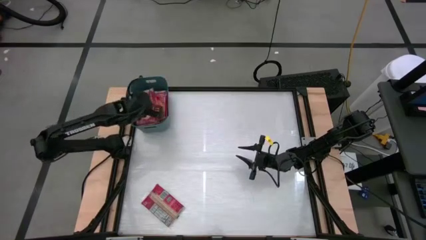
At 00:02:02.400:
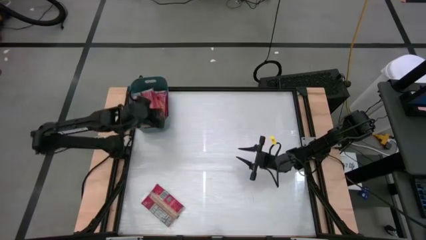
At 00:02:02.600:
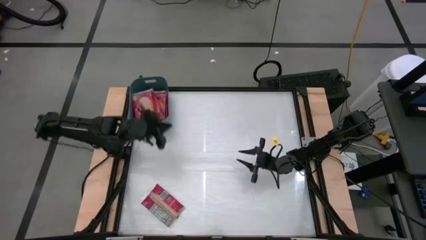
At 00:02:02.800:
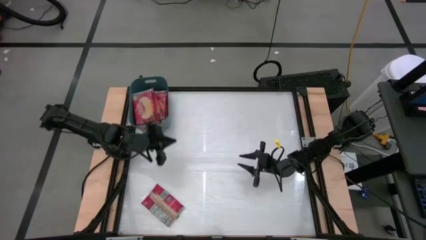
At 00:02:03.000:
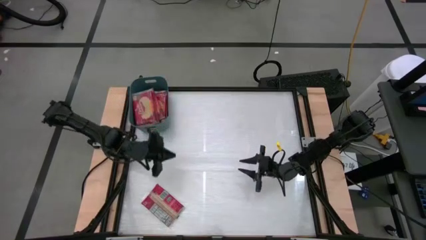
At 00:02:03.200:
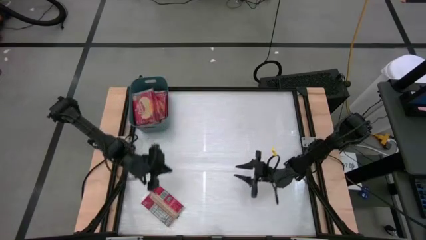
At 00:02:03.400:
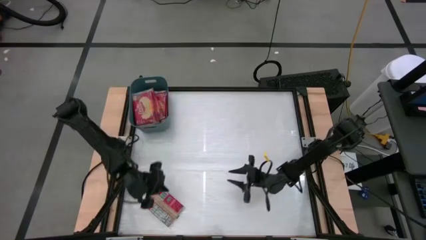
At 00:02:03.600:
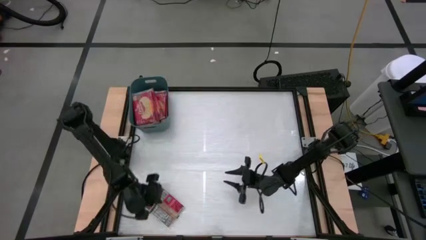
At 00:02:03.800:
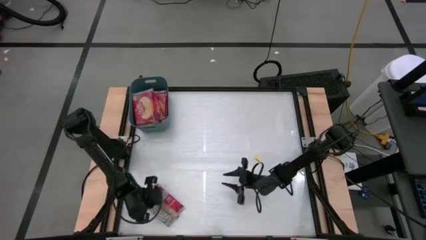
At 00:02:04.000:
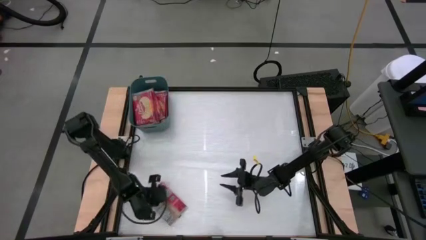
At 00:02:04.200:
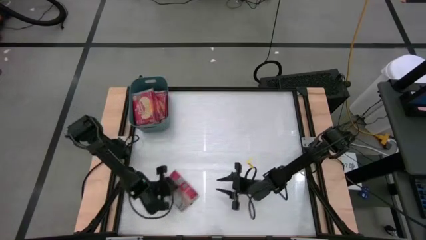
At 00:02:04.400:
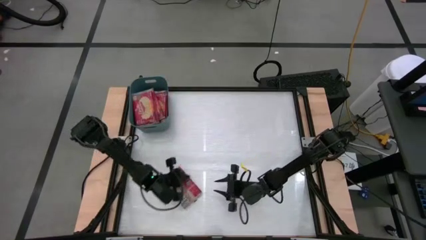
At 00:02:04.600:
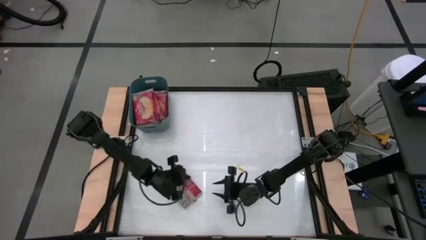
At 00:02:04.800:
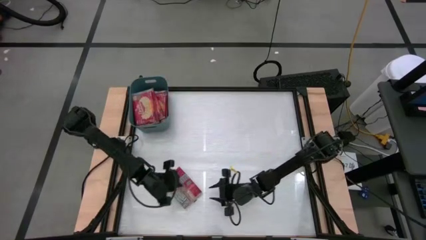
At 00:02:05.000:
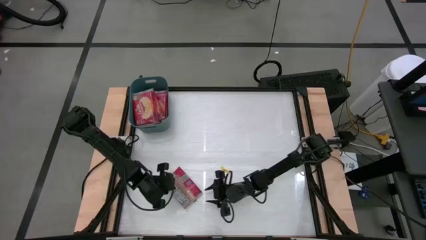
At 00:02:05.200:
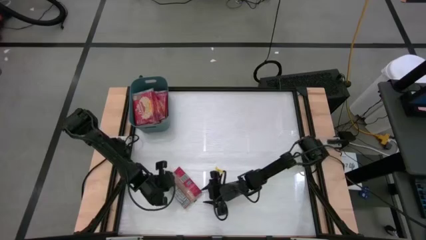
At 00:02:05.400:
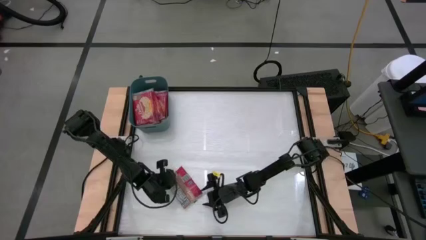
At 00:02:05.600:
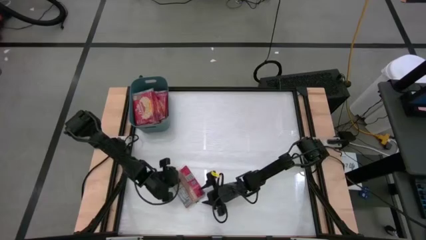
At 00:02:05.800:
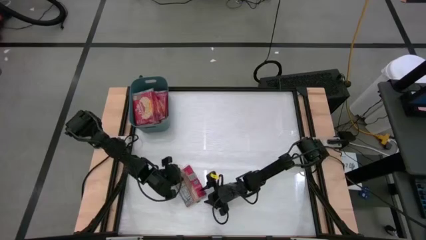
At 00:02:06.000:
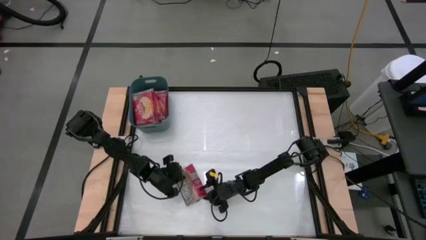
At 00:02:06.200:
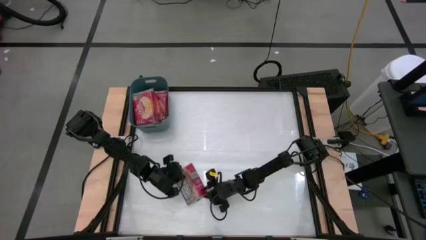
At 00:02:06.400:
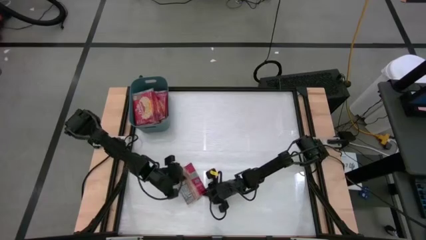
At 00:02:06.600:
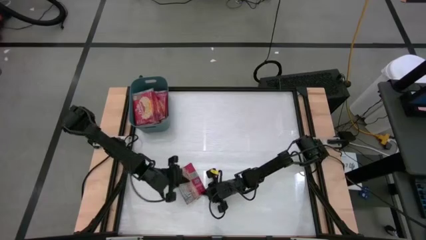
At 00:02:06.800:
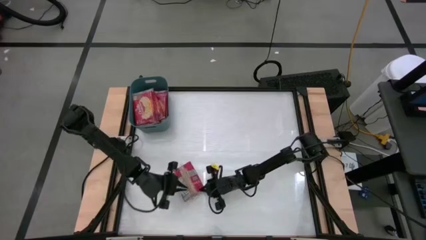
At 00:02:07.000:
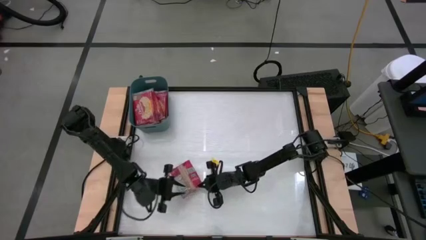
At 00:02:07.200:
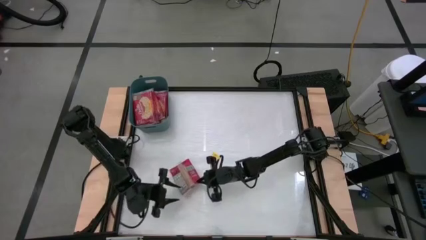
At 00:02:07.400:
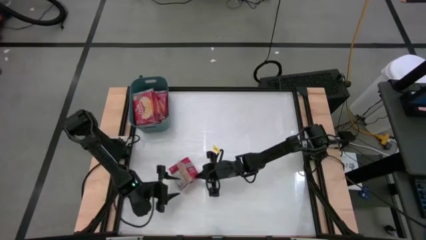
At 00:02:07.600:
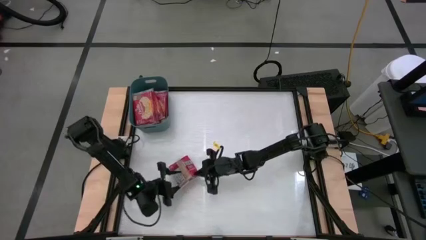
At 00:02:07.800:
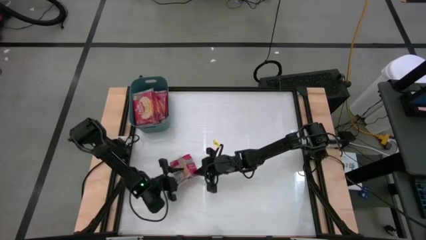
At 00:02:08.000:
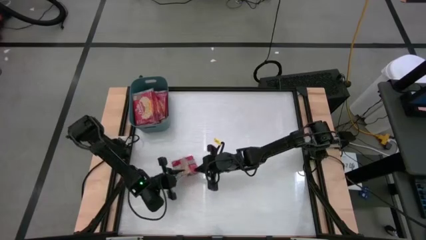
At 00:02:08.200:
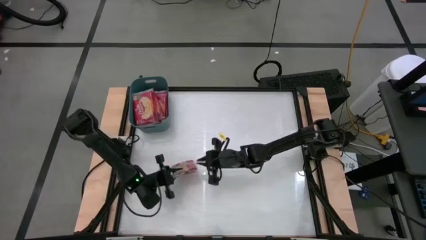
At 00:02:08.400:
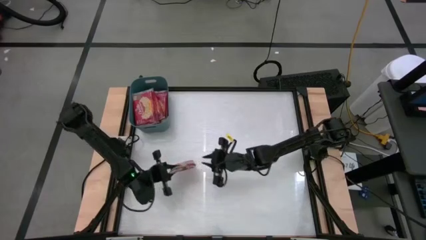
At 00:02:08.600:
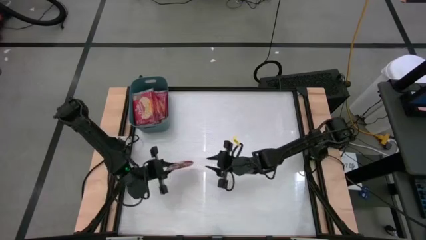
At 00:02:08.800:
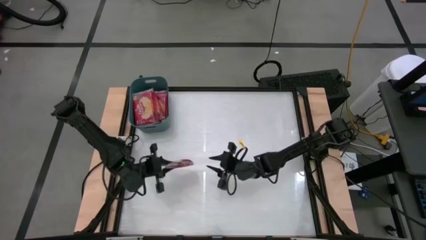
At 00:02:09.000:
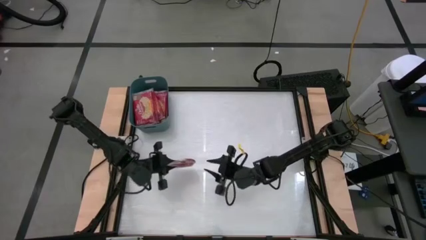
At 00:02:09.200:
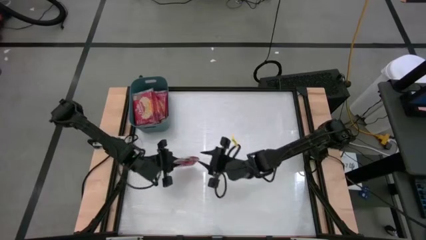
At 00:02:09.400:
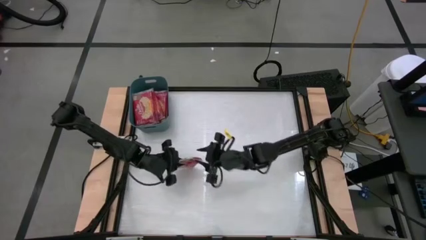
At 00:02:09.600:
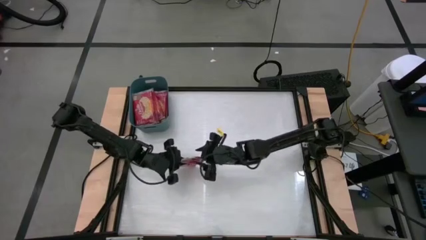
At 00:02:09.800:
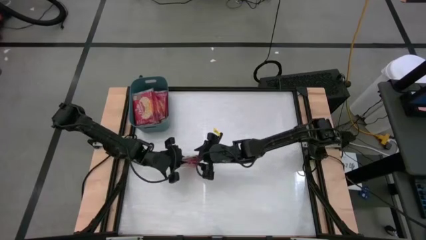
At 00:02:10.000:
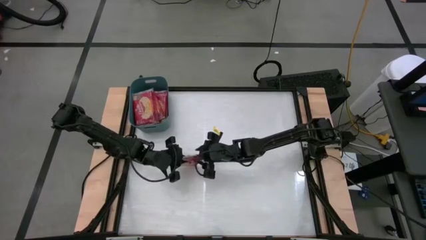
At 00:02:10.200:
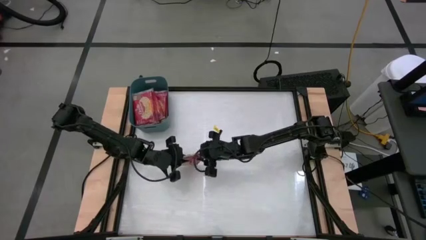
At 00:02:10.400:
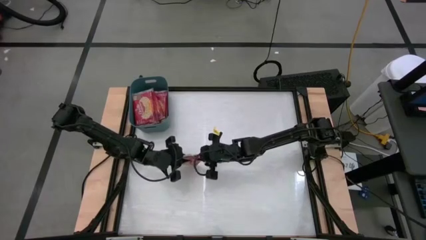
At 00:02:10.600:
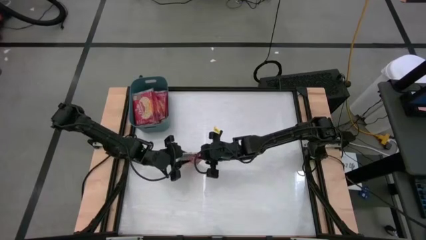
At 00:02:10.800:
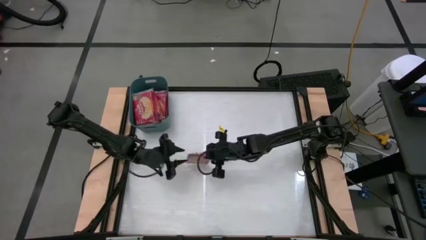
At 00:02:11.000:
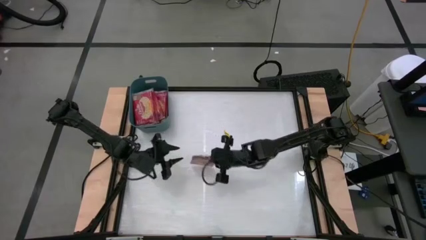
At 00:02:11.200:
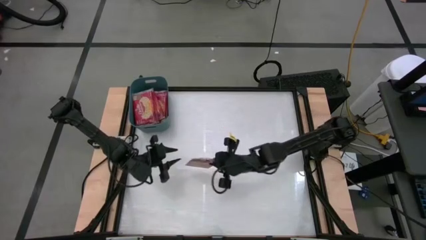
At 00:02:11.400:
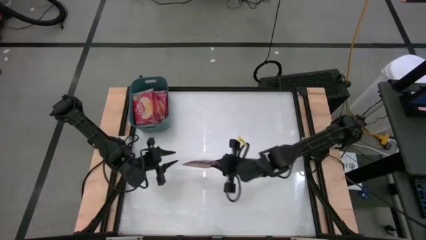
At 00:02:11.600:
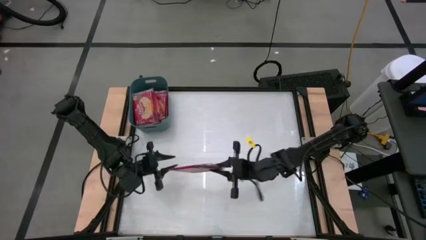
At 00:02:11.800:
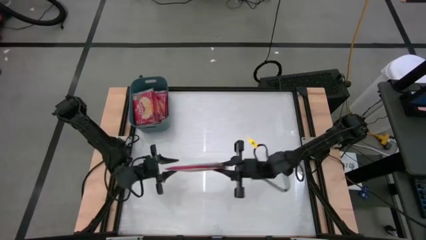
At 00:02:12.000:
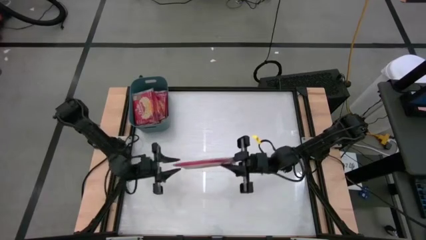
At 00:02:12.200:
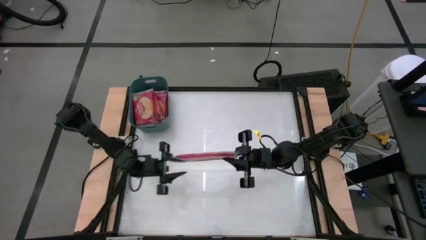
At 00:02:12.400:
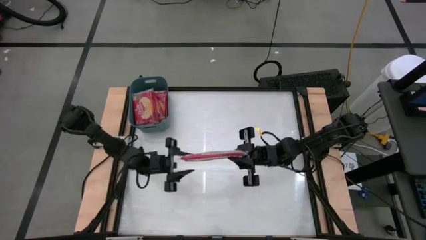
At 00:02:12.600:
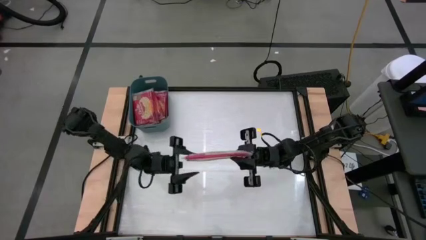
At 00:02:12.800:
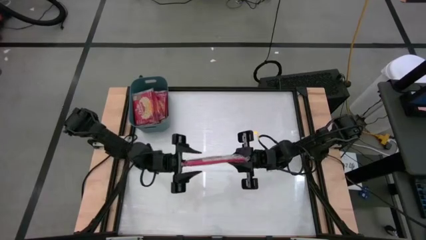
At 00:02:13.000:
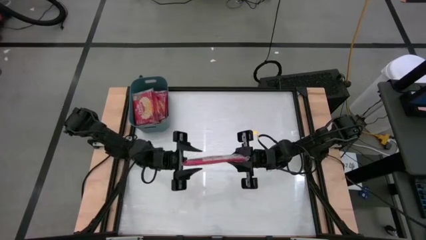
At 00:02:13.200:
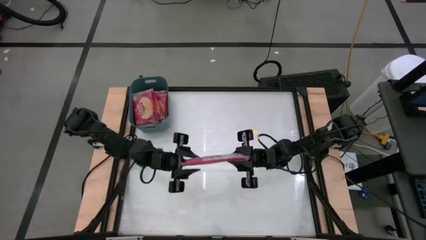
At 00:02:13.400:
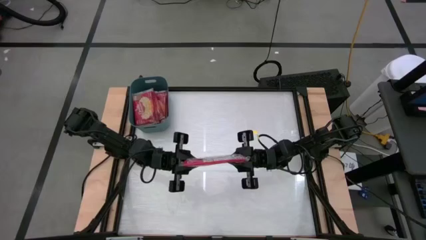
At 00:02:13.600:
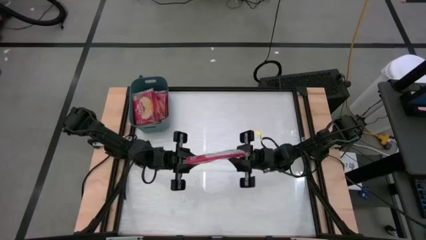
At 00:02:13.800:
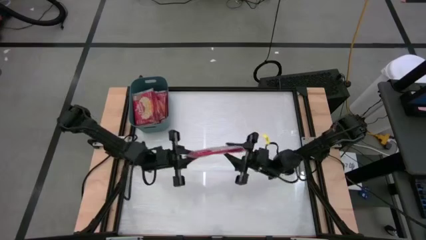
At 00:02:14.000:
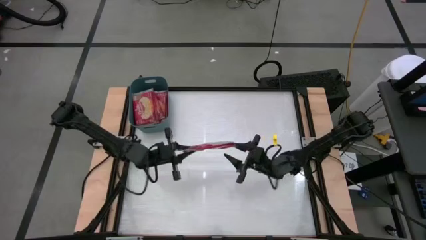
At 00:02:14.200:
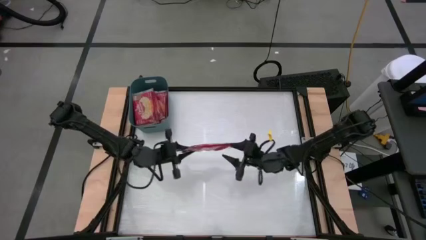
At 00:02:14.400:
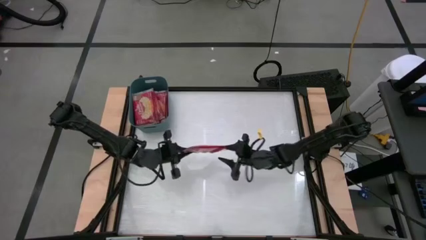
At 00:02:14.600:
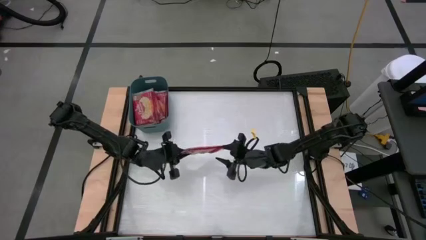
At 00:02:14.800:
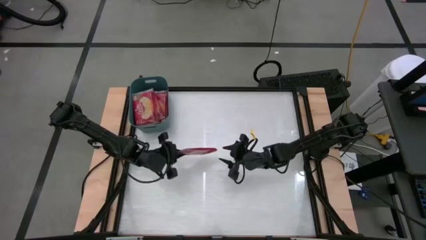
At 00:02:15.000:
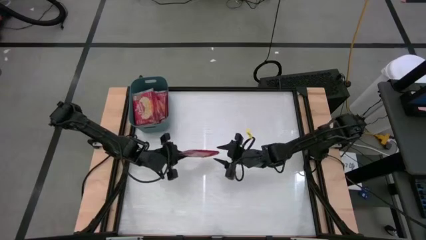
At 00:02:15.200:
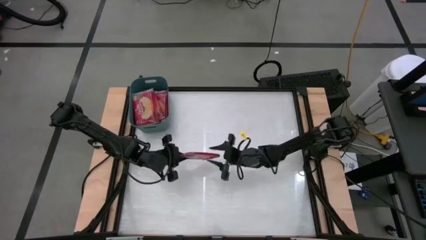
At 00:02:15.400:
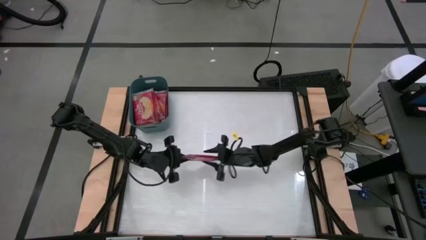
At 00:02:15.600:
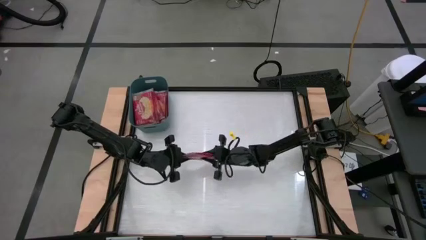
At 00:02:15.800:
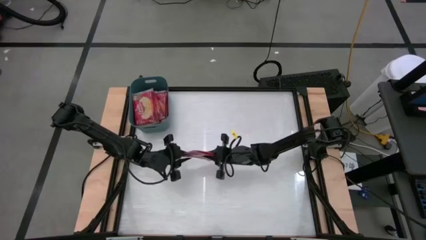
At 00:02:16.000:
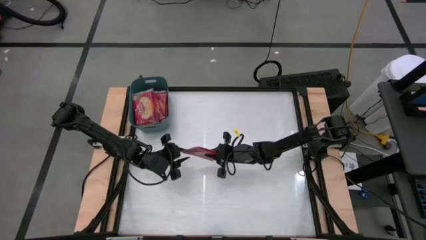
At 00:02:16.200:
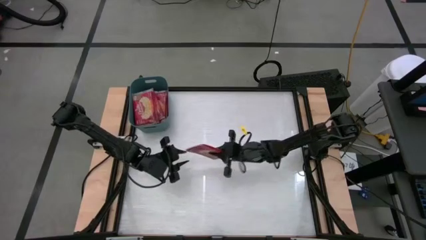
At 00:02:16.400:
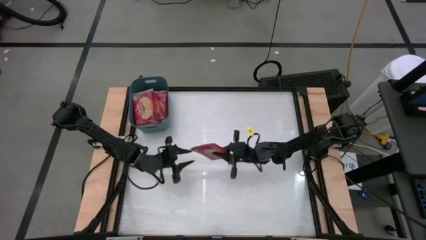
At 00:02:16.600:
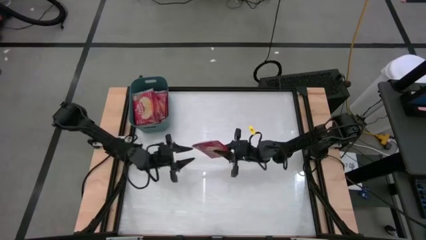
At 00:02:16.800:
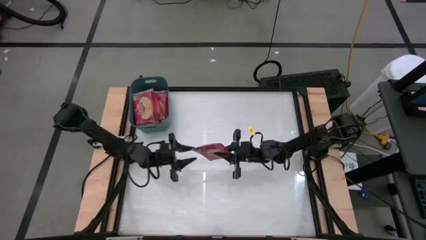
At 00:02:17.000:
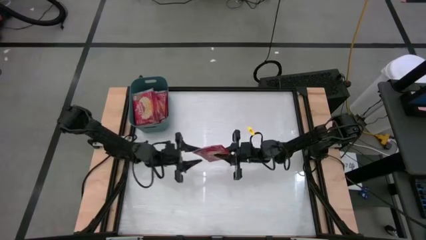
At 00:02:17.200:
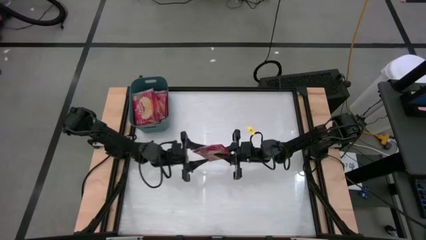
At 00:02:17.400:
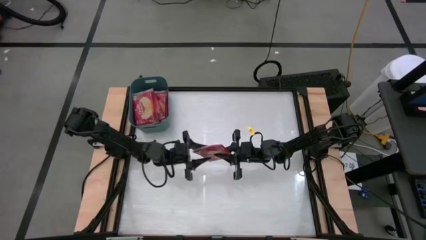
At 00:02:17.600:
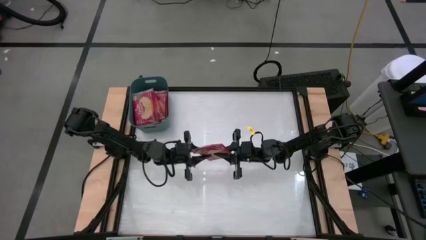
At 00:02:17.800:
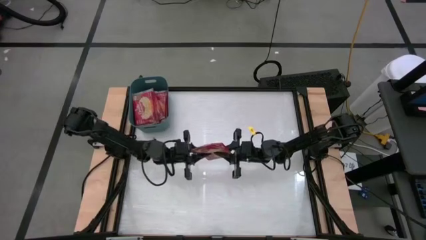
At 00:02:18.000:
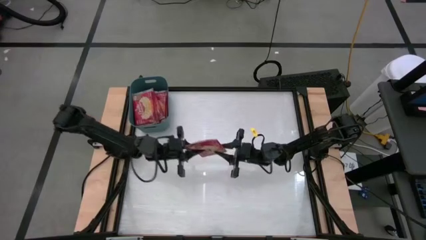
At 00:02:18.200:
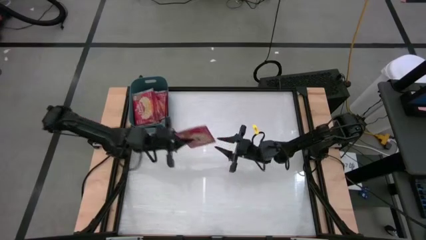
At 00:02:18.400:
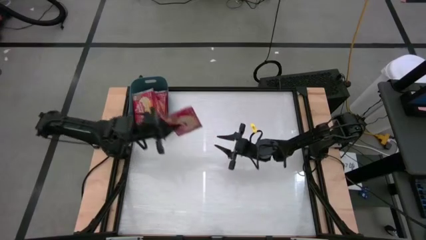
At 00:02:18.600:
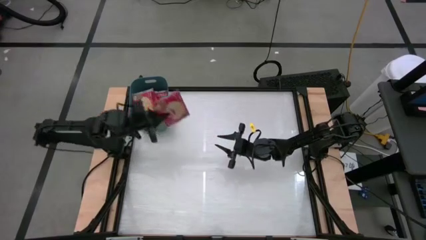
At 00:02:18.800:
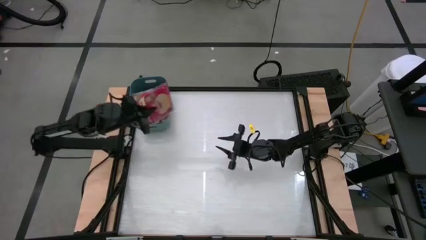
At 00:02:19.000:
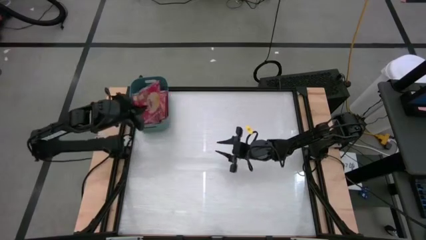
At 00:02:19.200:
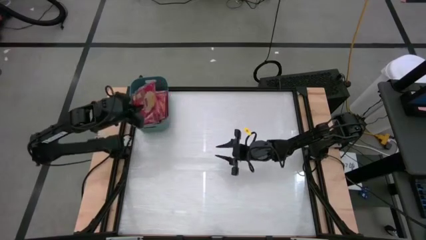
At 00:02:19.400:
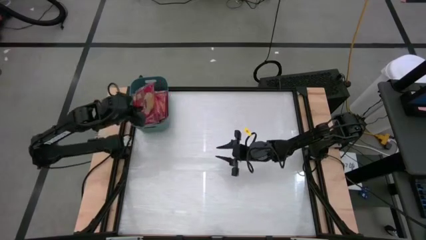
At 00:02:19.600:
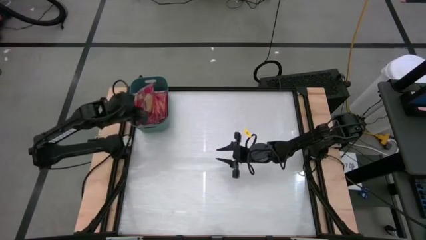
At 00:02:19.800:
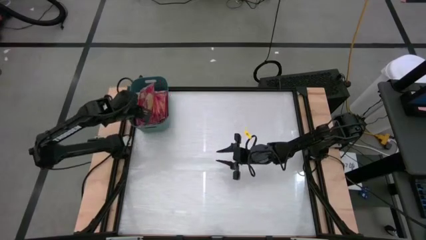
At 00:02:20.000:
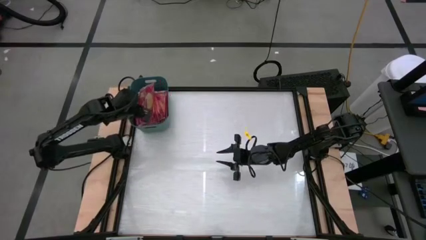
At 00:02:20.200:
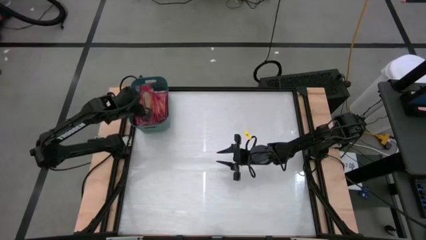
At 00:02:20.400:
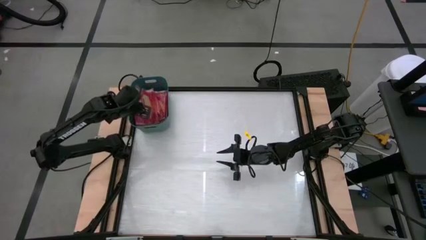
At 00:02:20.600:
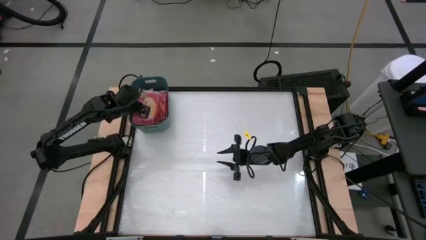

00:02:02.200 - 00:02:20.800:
Task: Sort popcorn bags into baskets
Stack the red popcorn bag on top of the other red popcorn bag into the blue bin
